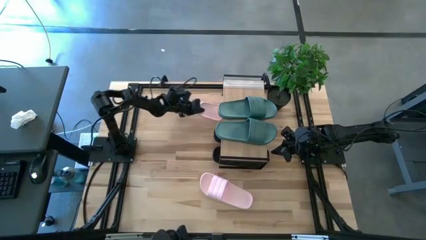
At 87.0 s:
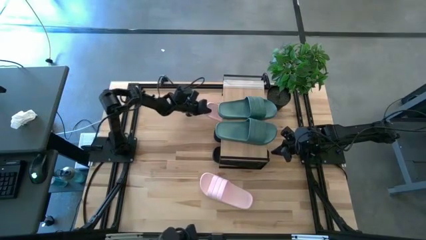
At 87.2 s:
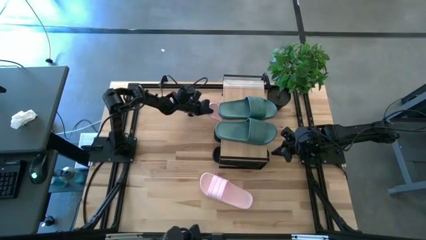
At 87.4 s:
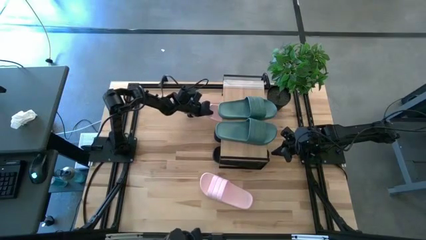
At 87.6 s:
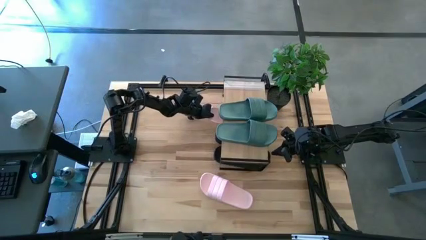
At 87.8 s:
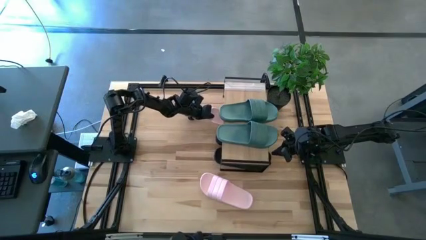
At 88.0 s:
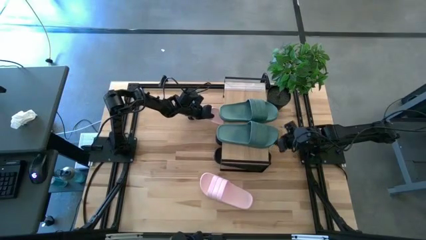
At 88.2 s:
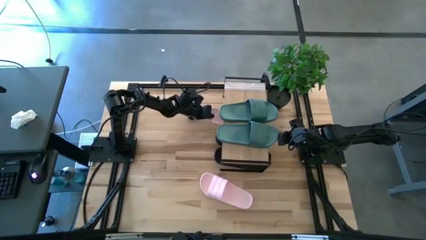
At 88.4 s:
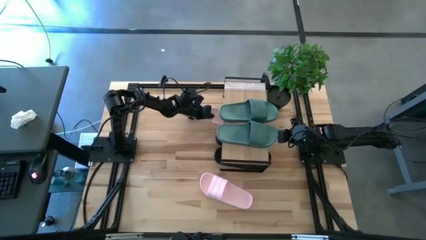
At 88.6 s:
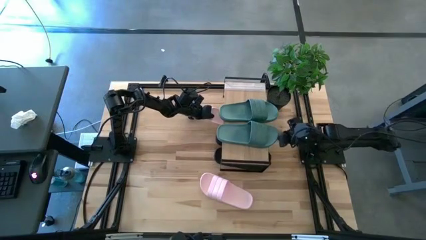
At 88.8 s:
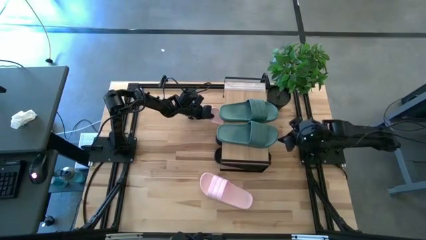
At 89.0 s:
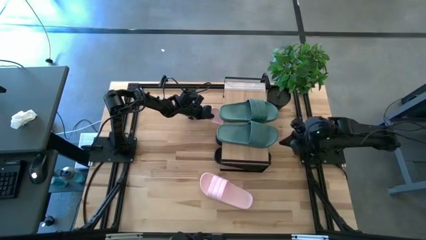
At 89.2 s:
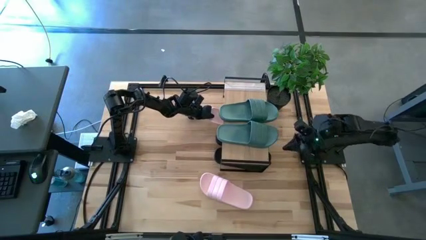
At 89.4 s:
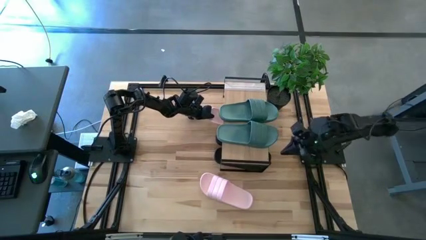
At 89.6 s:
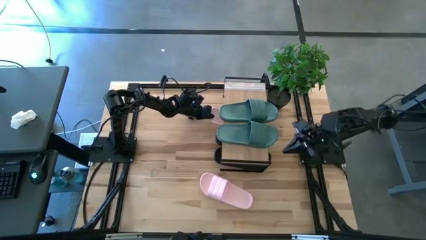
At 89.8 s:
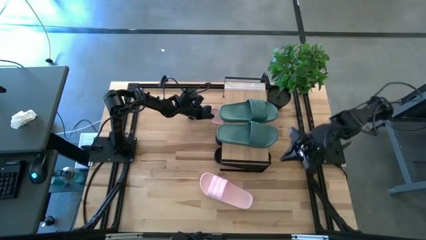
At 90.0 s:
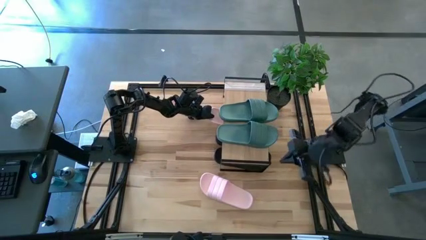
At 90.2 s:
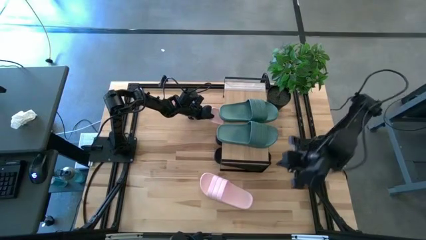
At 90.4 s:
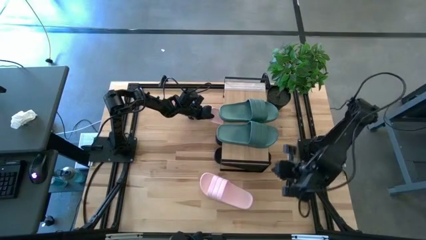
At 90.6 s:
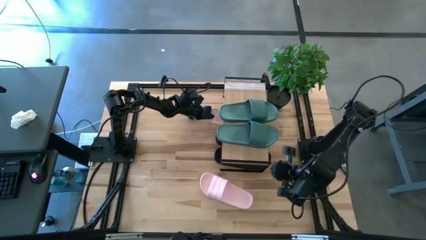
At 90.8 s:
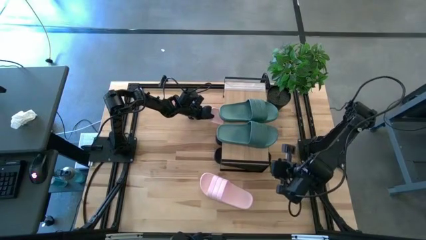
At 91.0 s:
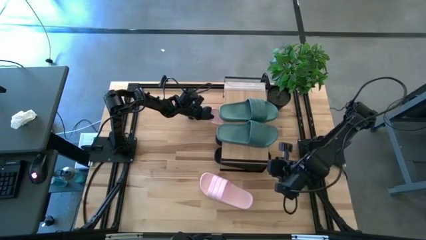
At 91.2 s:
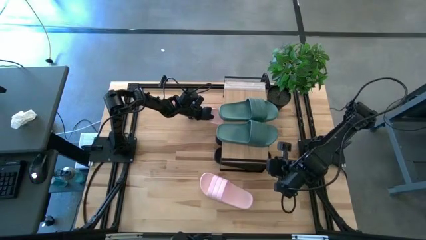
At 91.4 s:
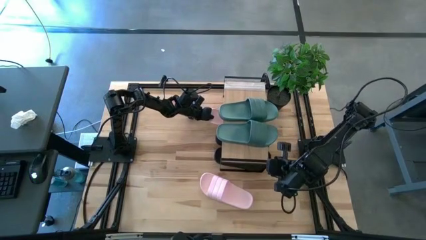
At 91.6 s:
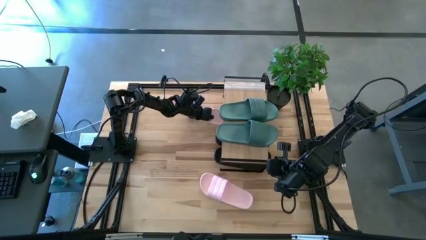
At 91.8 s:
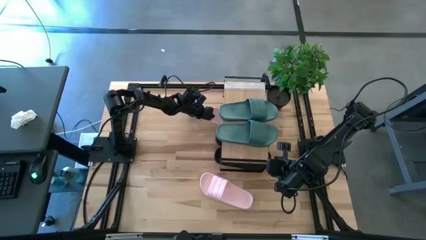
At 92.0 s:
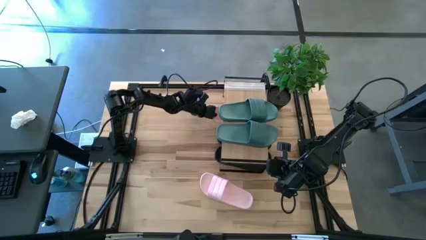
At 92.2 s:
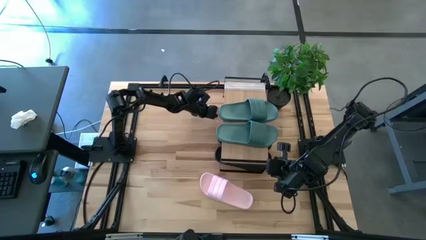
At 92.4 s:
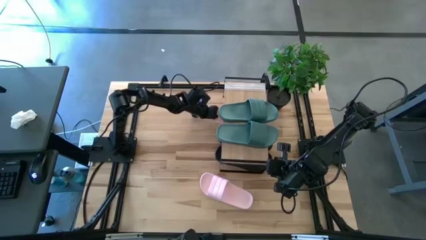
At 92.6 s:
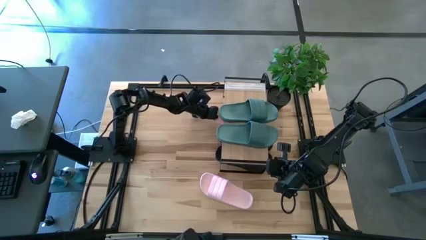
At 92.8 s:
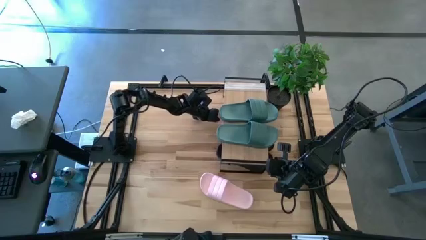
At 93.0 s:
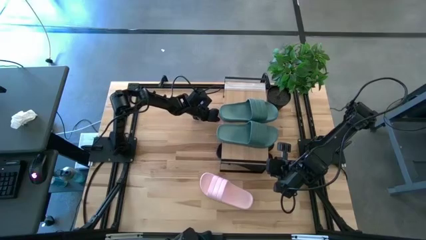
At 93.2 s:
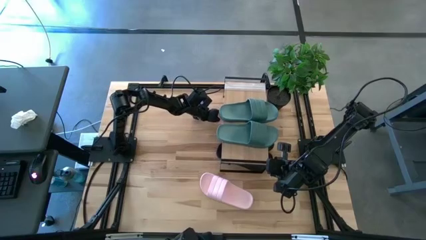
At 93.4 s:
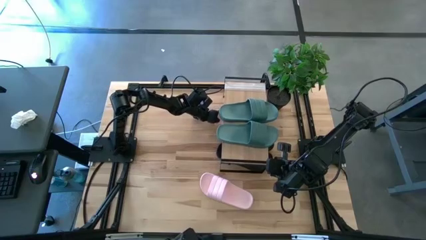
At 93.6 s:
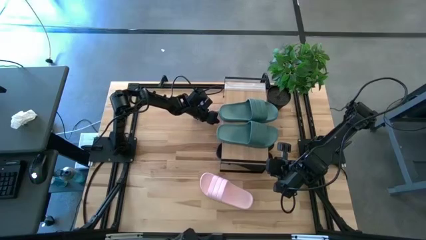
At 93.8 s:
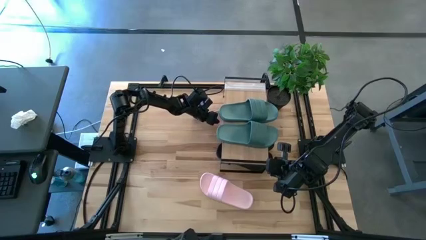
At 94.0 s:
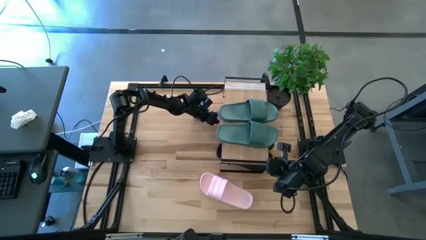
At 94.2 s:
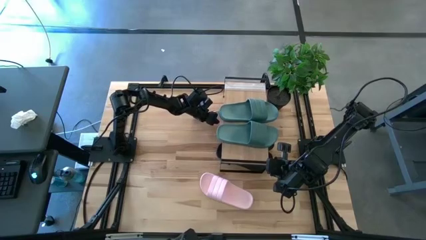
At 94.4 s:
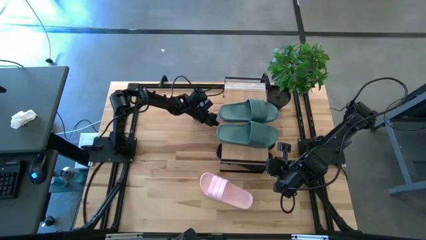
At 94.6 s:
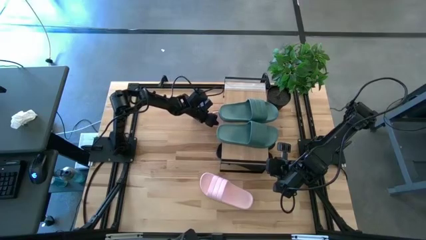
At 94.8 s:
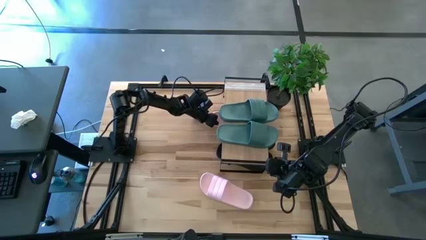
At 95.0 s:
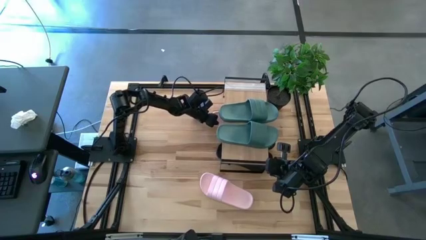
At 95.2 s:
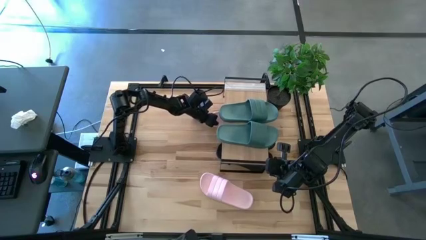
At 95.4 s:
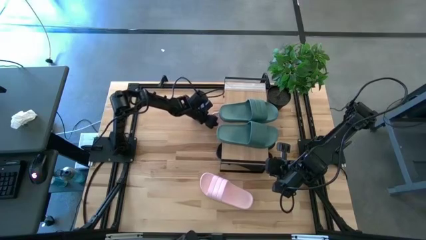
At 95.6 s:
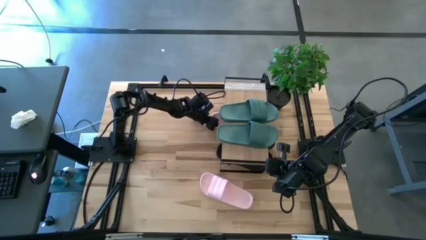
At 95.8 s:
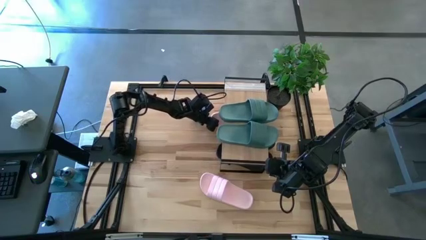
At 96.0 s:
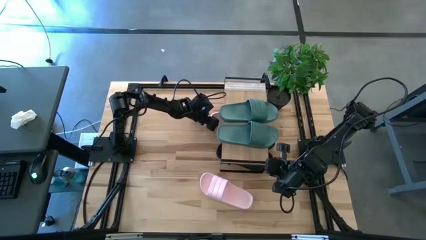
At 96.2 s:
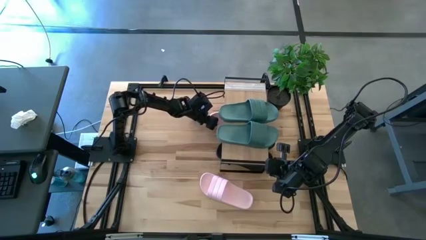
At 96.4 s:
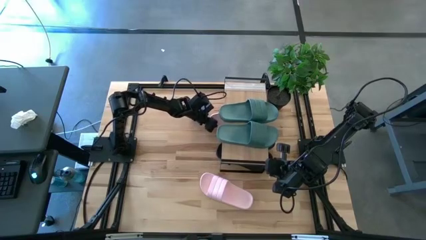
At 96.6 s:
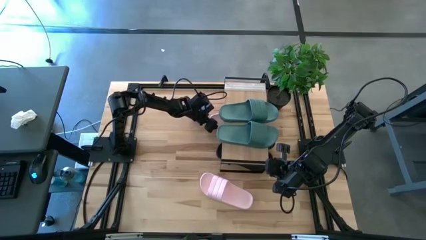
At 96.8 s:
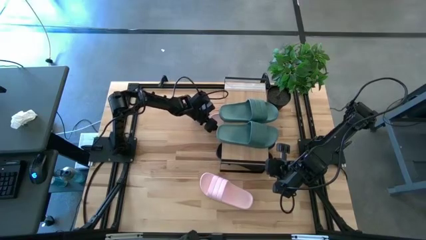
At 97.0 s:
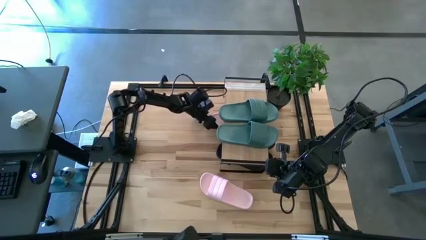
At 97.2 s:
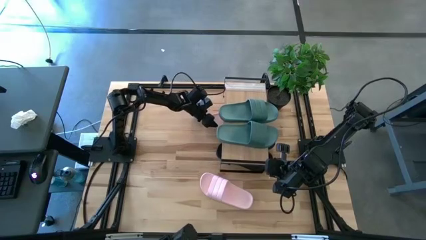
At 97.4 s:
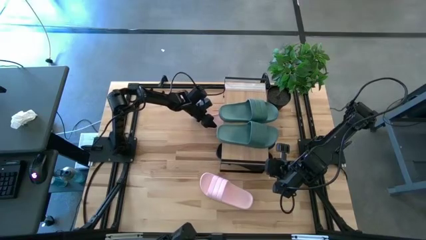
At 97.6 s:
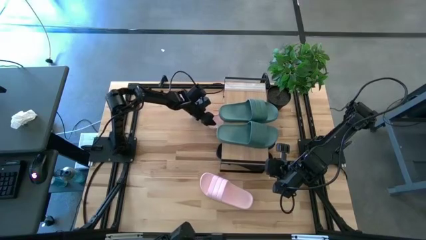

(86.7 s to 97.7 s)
Task: Pick and place slides into the shelf
Put the top pink slipper under the shelf

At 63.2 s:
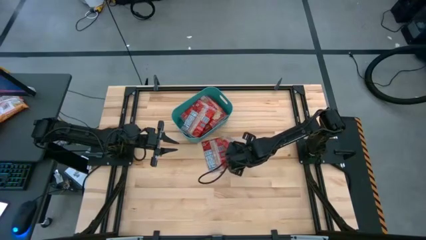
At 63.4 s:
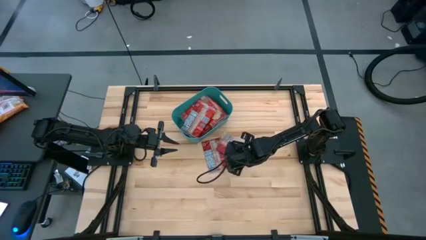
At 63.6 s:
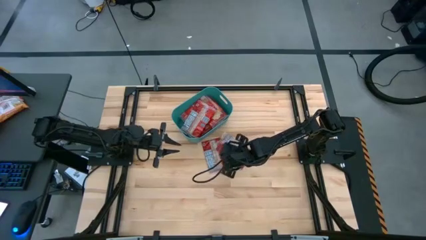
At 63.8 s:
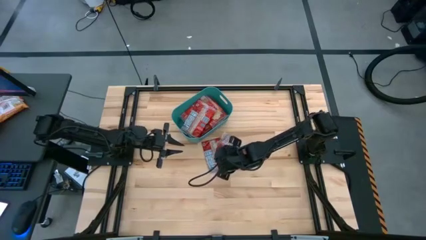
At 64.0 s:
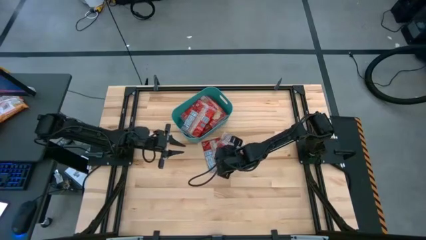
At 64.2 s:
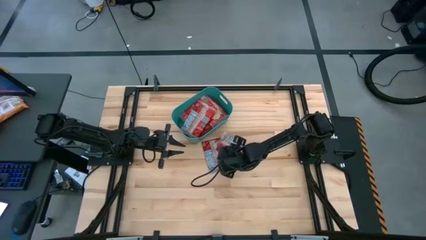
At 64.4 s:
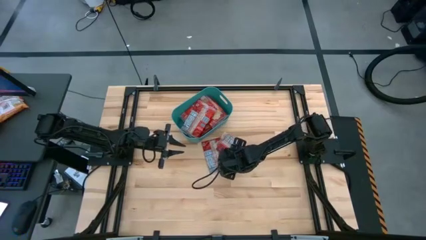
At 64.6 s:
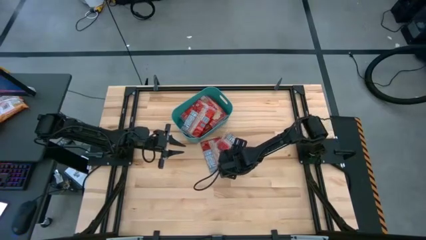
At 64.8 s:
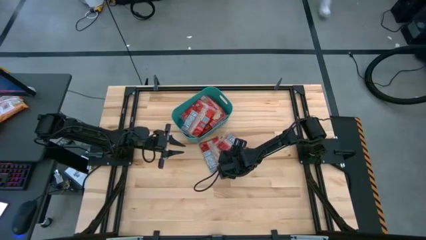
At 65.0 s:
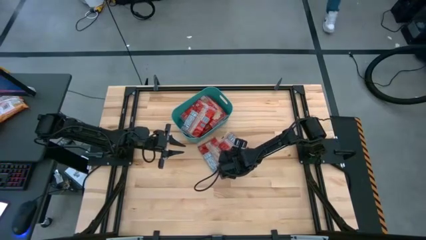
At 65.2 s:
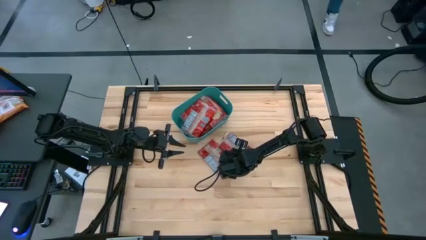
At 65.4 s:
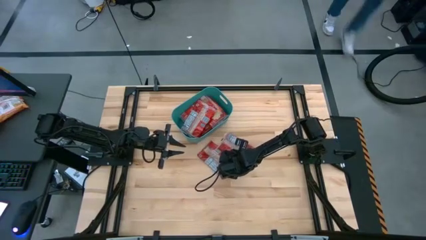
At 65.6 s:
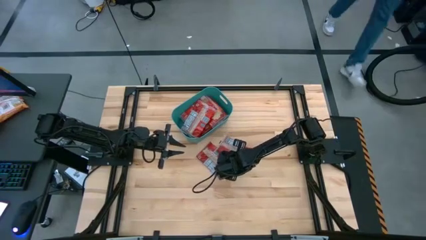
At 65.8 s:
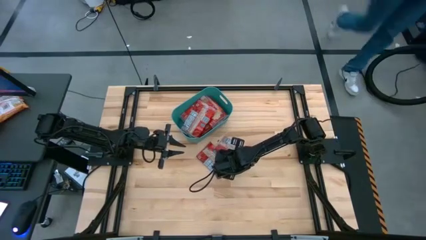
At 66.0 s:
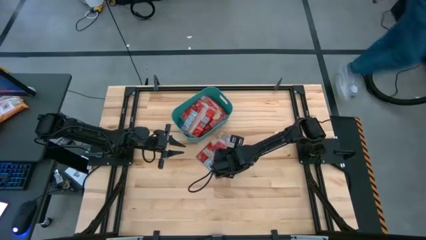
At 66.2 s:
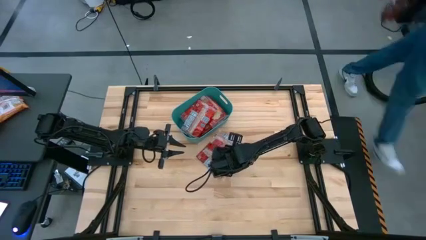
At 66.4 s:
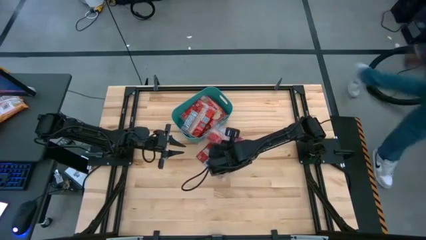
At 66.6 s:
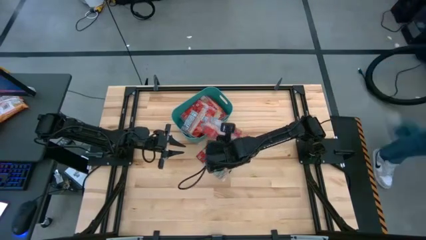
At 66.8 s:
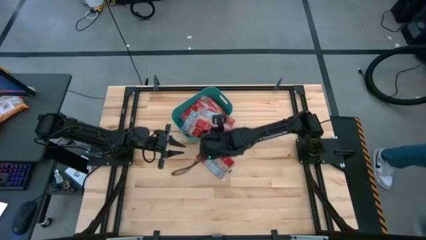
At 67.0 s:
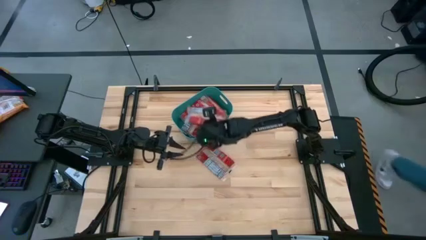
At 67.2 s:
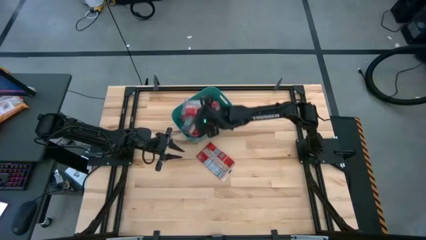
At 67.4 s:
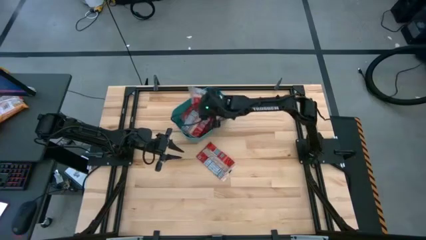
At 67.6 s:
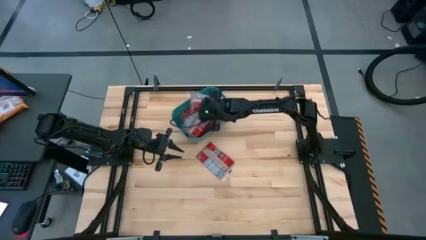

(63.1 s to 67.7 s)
Task: Sort popcorn bags into baskets
Put the red popcorn bag into the green container
